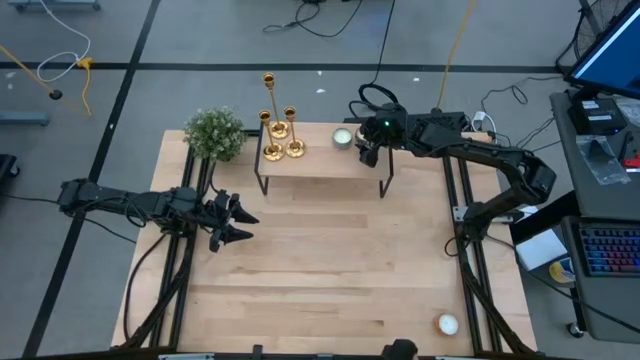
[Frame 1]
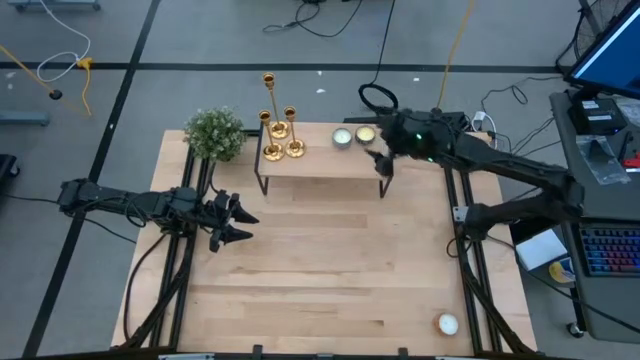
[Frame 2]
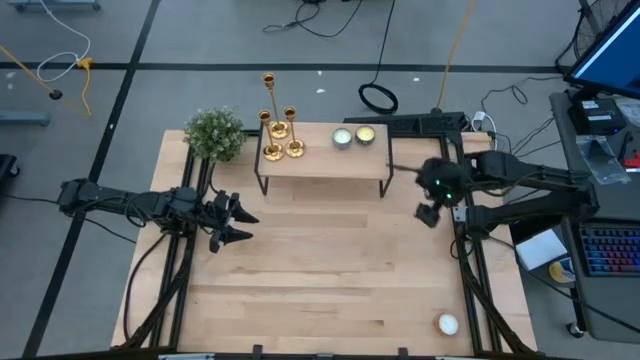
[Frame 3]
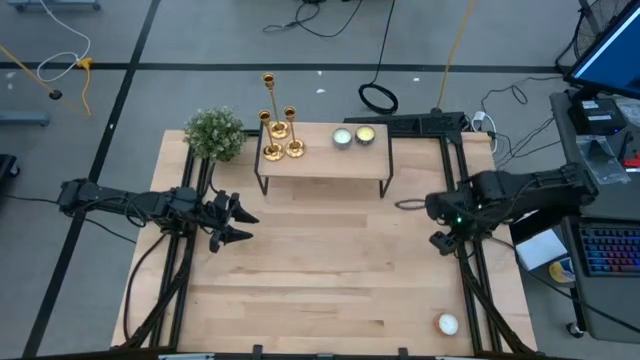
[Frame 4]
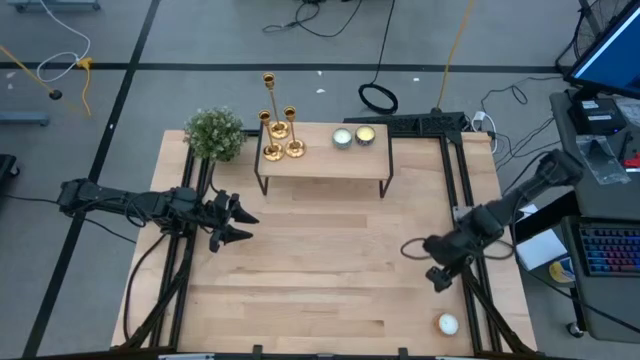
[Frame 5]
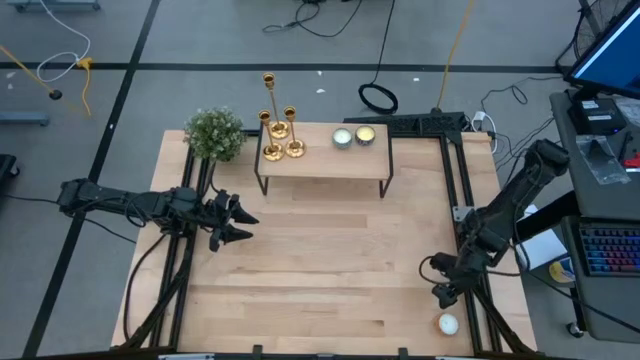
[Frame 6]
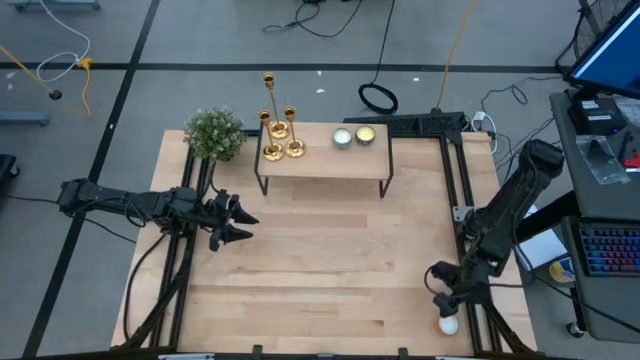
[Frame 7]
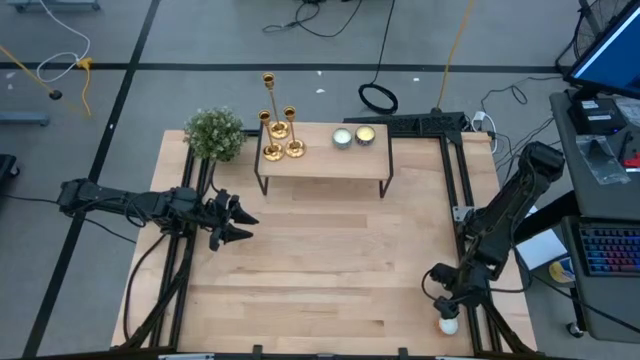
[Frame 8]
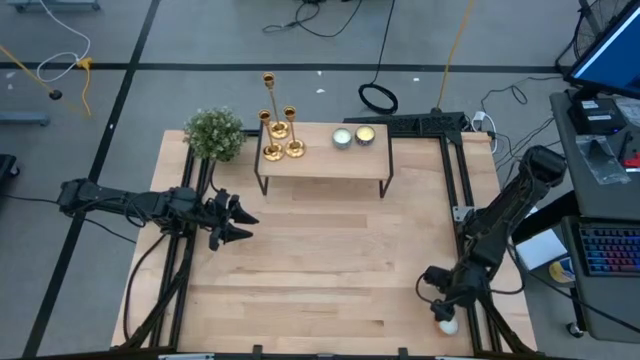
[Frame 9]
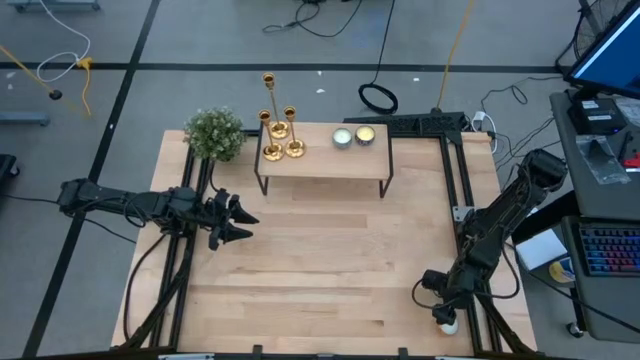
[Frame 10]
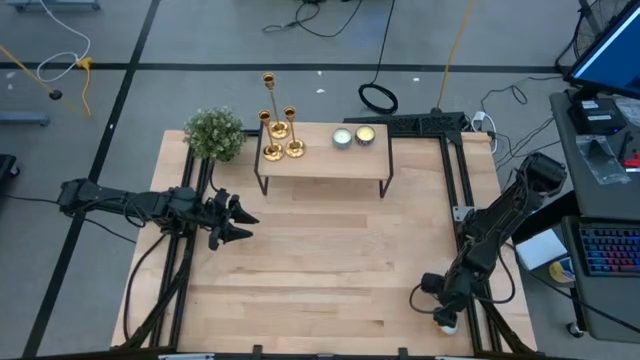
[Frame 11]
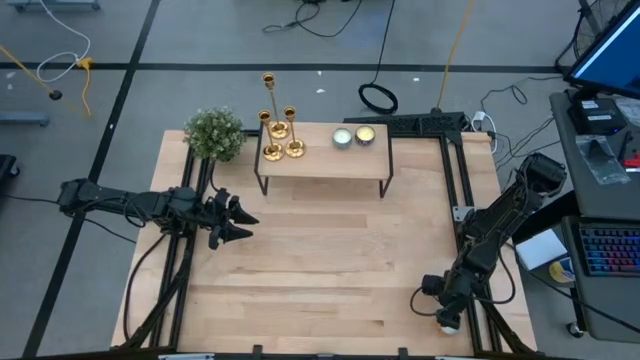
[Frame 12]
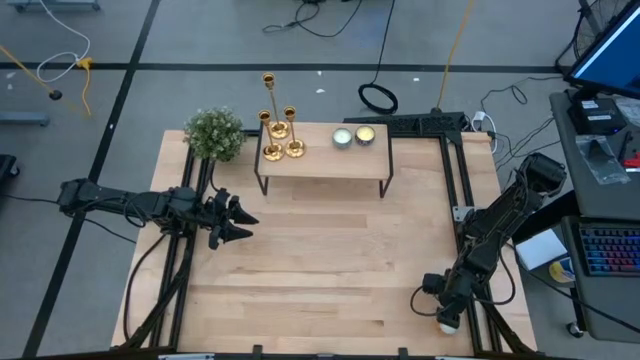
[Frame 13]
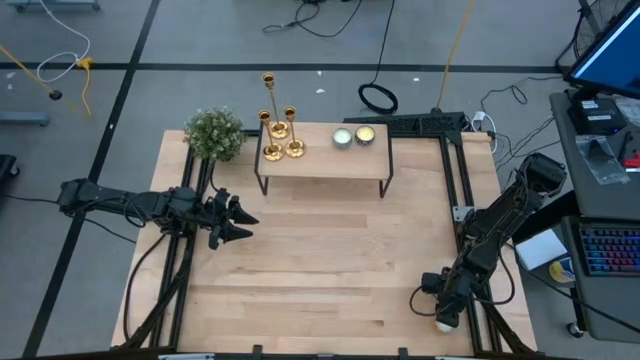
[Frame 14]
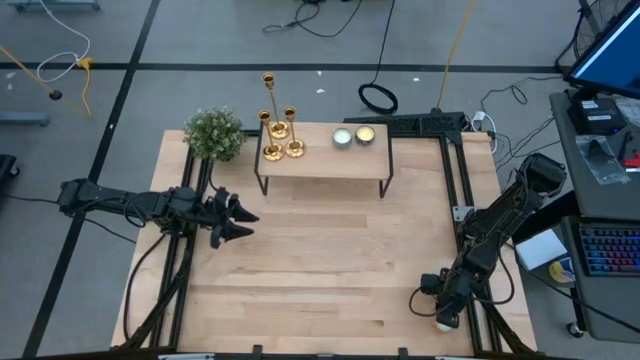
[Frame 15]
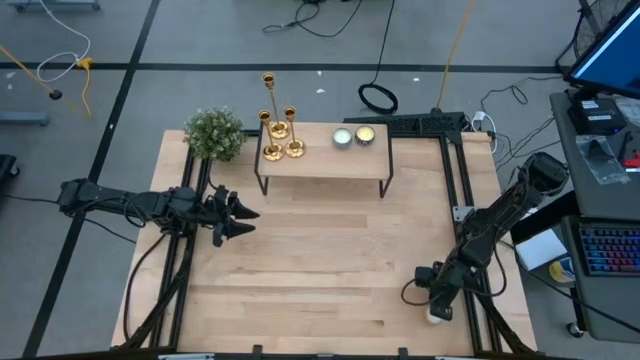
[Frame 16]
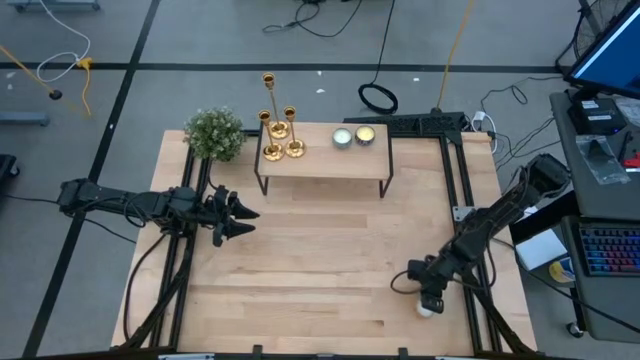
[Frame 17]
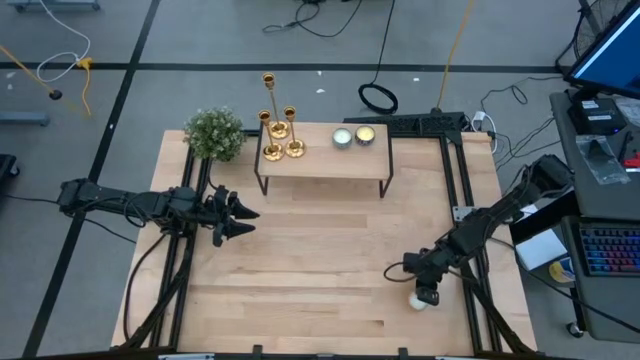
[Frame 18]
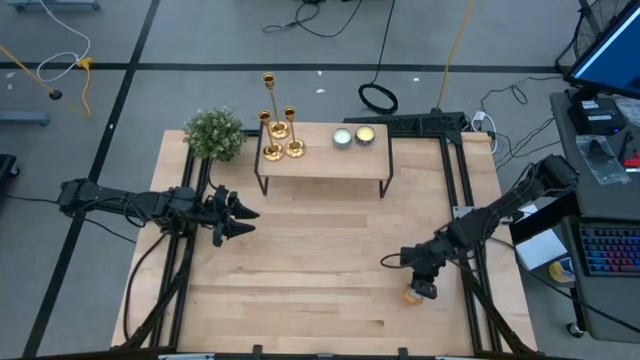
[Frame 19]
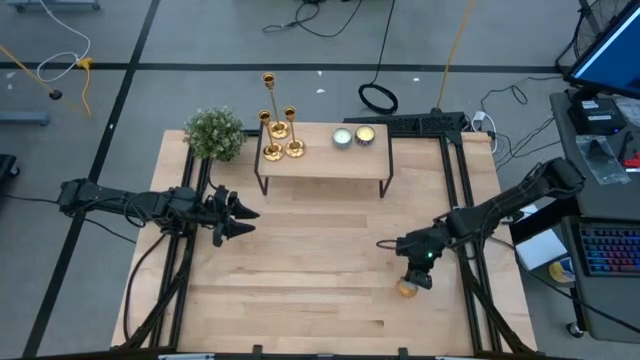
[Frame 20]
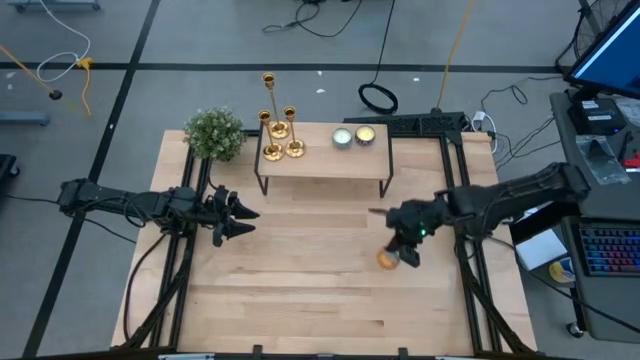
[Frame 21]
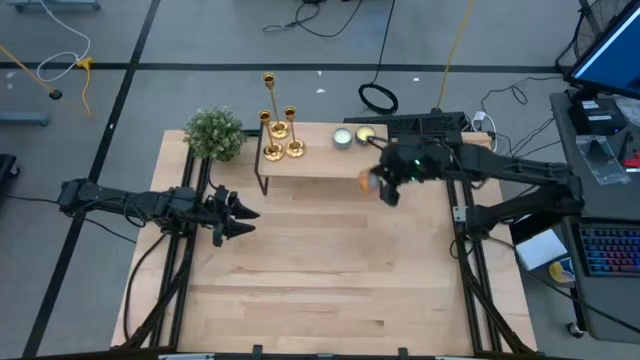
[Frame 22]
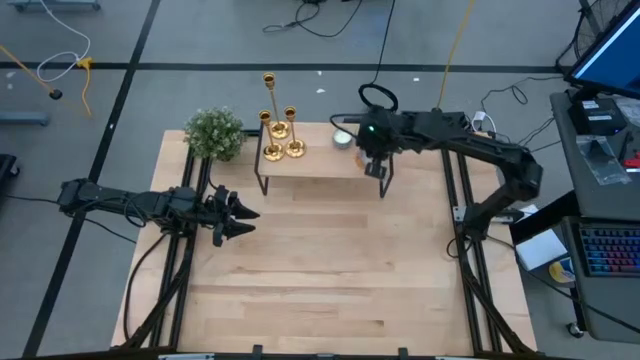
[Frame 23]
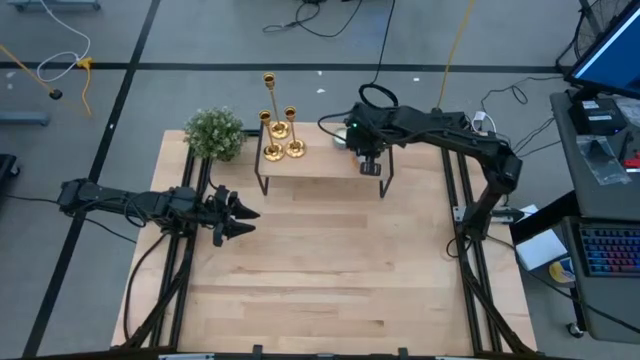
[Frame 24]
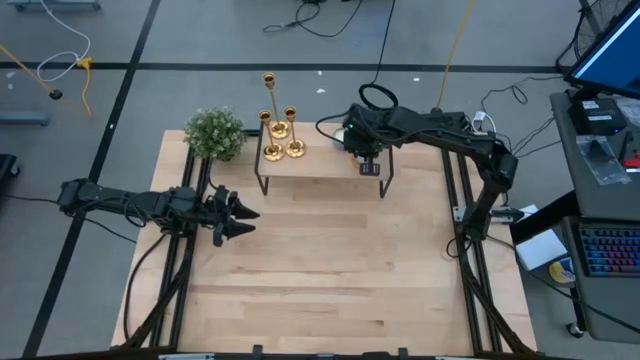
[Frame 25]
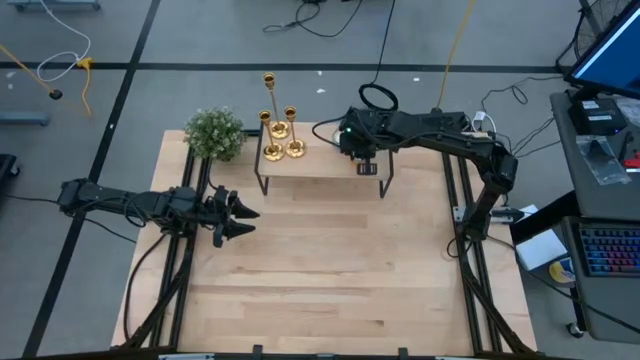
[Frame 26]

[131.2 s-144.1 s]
Task: Pick & Place candle stick holders
Put the orange scented candle on the shelf

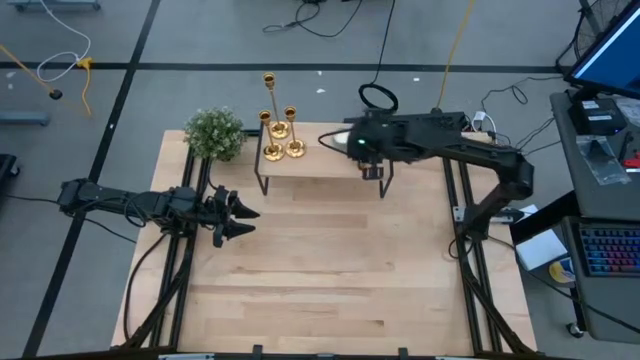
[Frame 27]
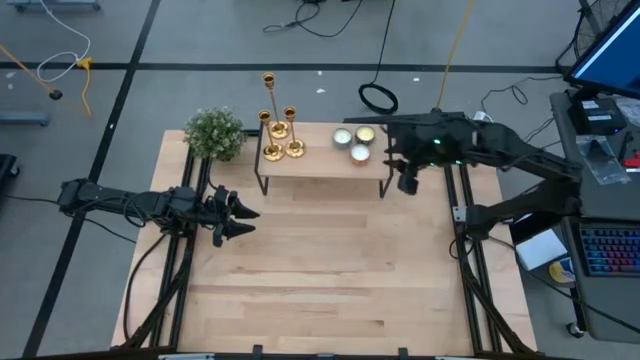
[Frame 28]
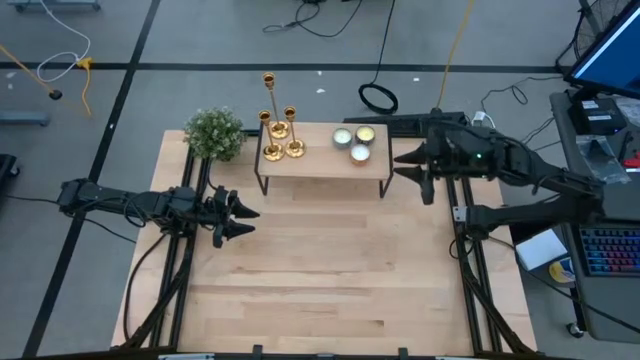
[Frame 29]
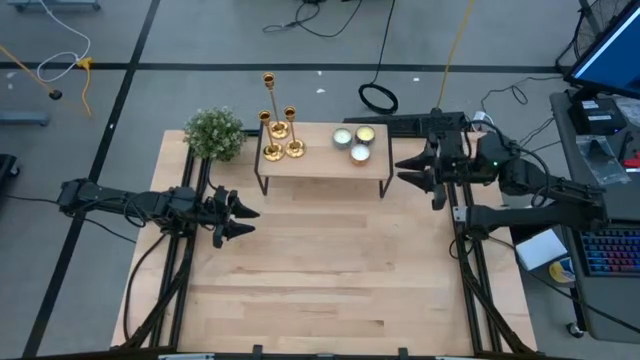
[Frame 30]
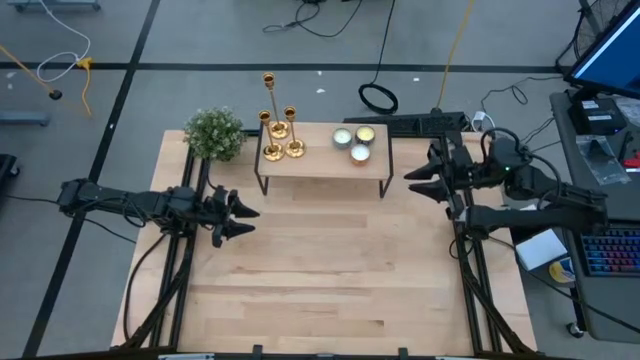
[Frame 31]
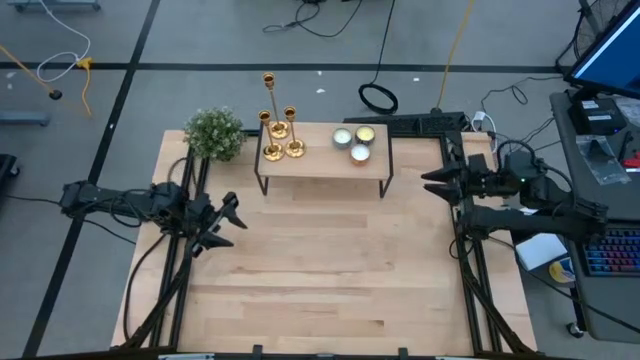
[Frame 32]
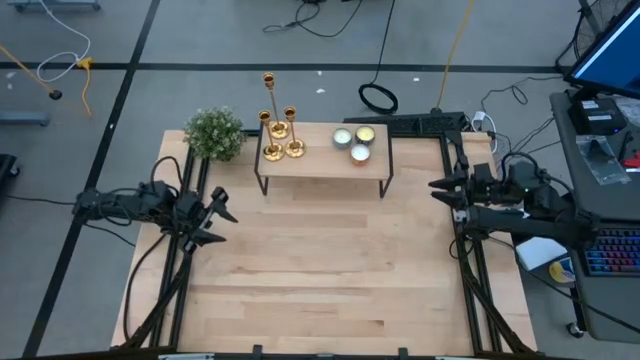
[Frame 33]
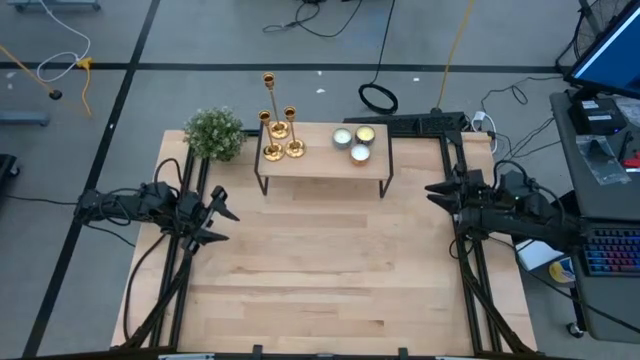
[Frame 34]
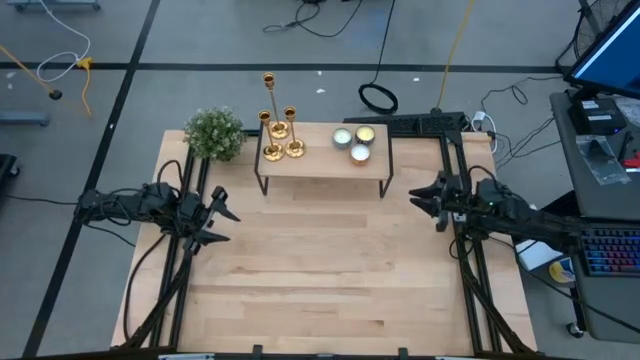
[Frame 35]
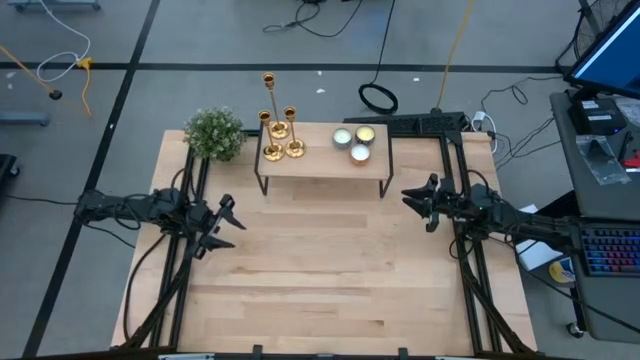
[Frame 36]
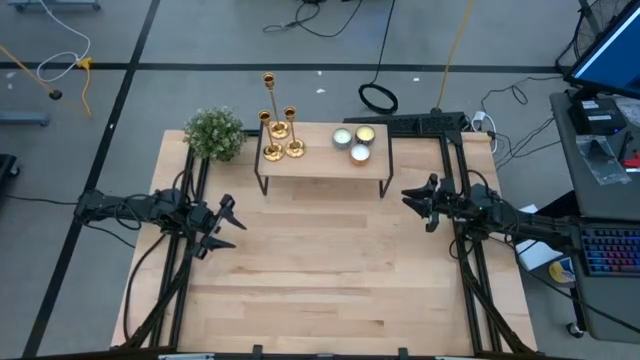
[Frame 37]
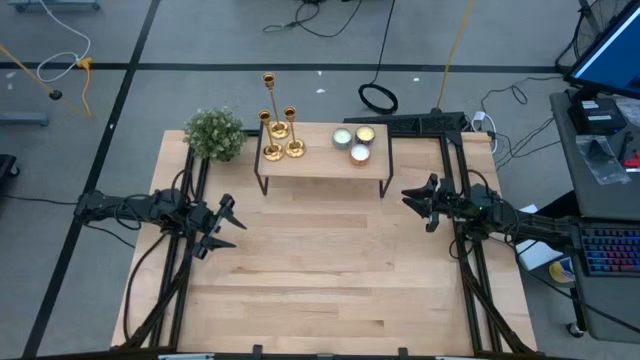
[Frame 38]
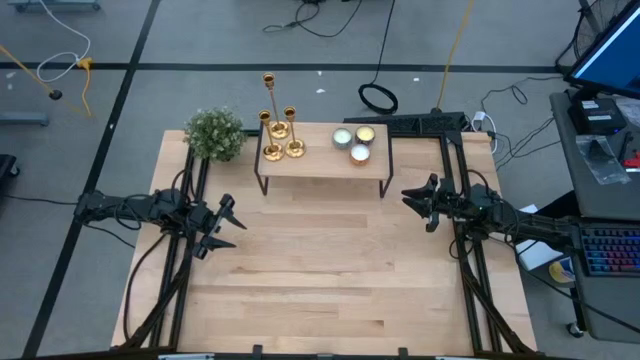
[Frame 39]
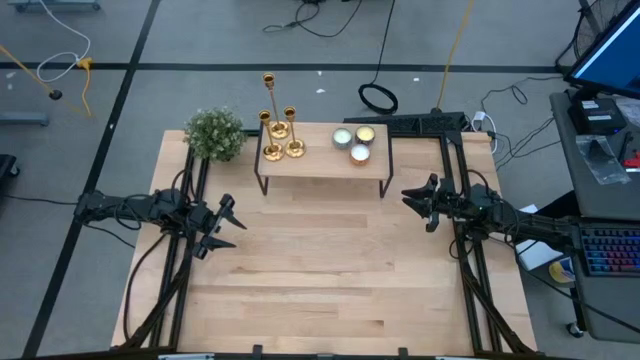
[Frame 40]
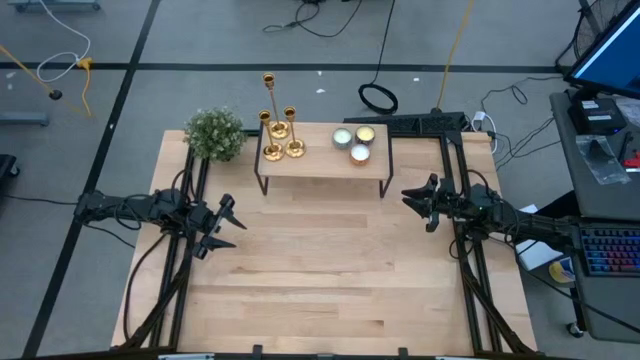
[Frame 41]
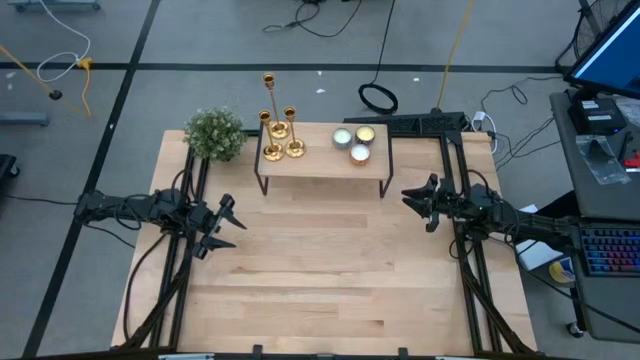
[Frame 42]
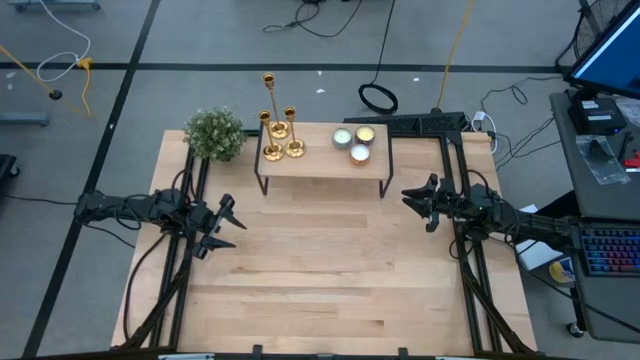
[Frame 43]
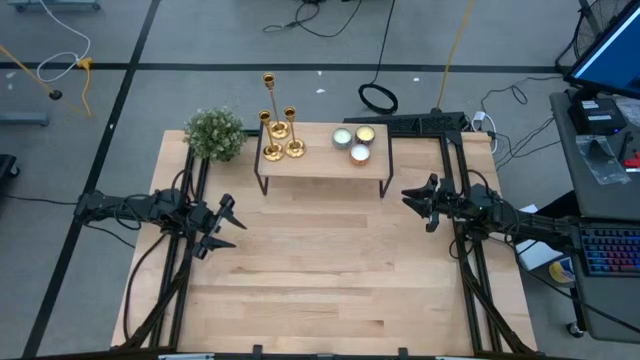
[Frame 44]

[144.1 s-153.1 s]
Return to Home Position
